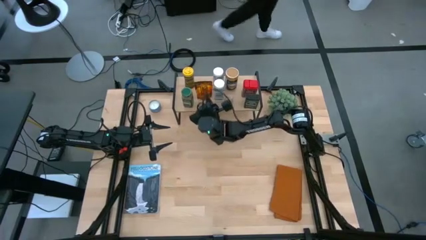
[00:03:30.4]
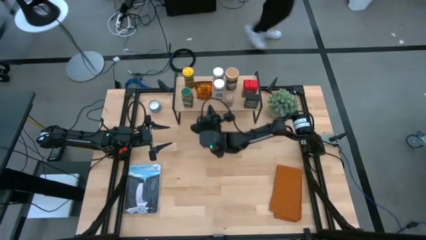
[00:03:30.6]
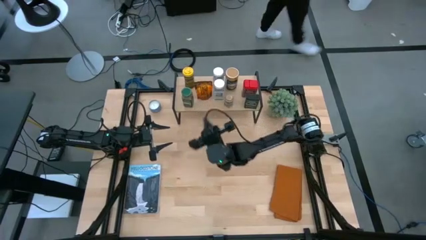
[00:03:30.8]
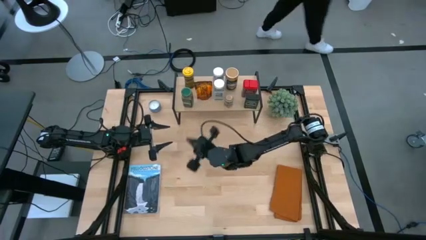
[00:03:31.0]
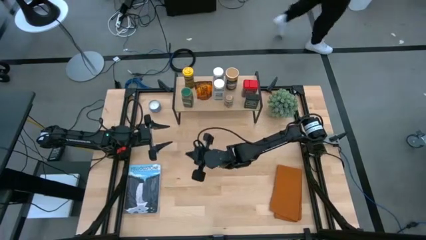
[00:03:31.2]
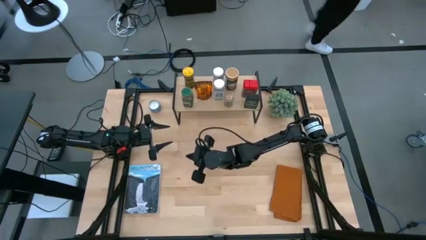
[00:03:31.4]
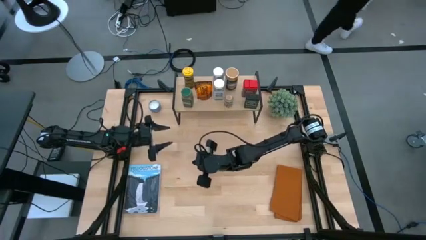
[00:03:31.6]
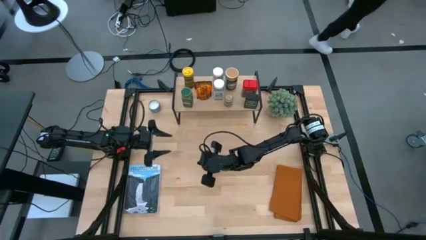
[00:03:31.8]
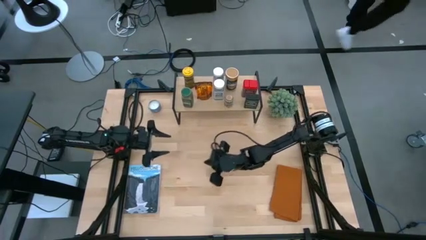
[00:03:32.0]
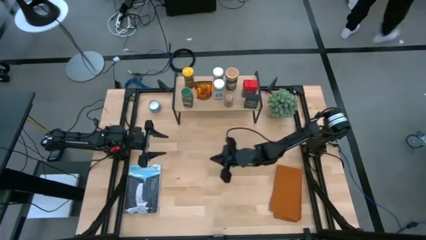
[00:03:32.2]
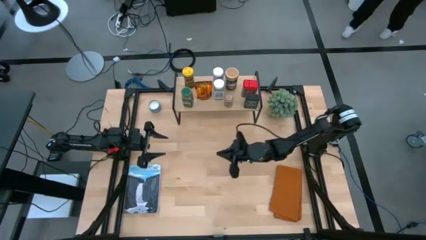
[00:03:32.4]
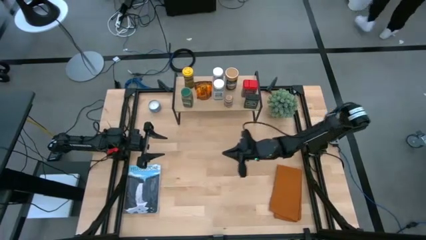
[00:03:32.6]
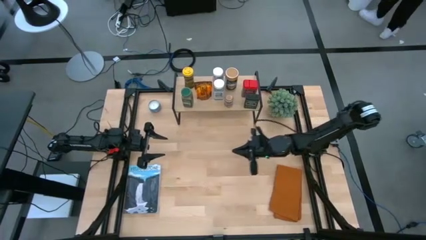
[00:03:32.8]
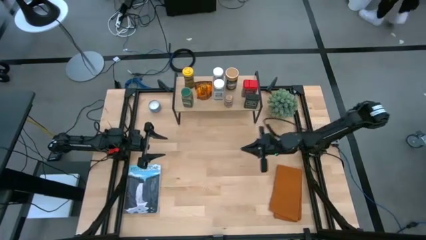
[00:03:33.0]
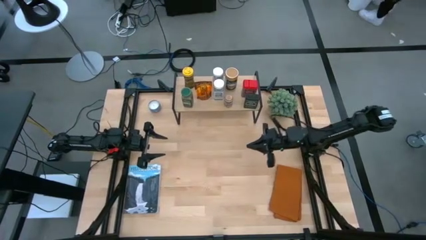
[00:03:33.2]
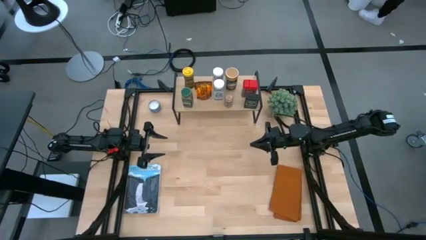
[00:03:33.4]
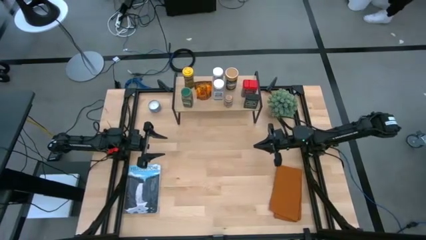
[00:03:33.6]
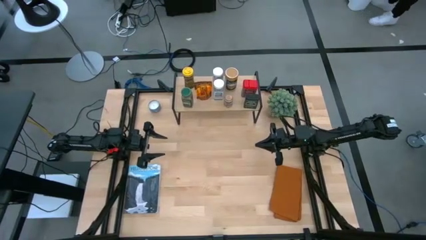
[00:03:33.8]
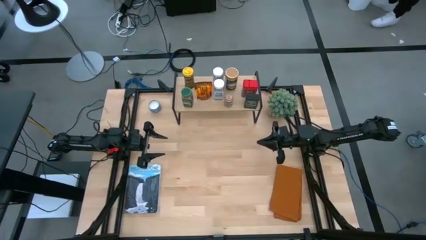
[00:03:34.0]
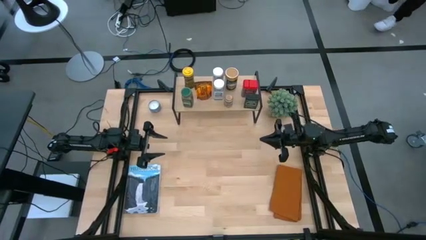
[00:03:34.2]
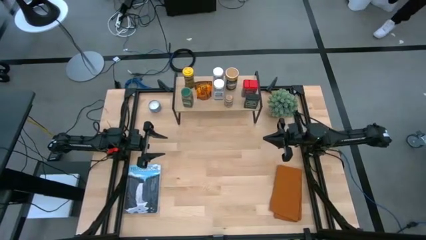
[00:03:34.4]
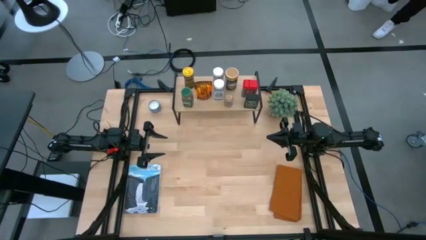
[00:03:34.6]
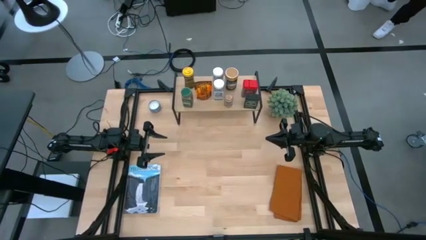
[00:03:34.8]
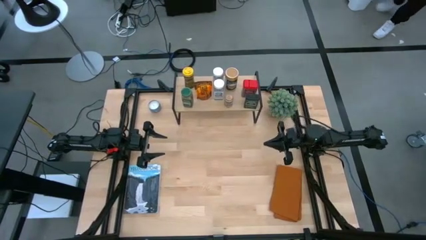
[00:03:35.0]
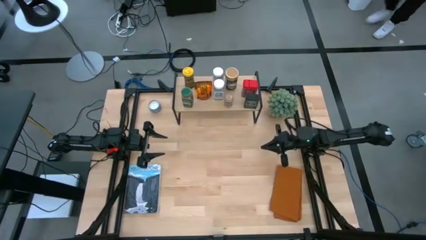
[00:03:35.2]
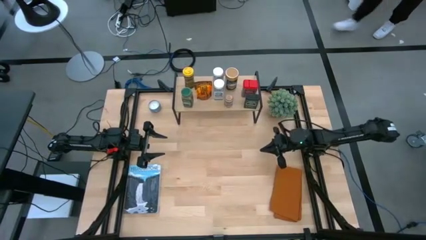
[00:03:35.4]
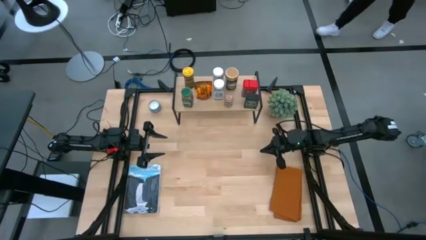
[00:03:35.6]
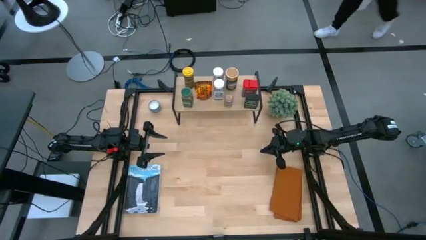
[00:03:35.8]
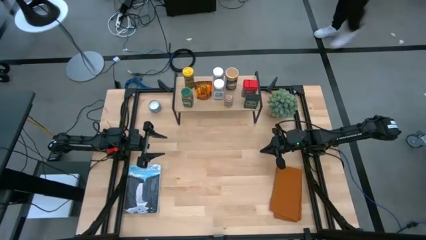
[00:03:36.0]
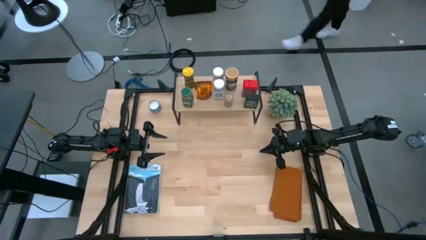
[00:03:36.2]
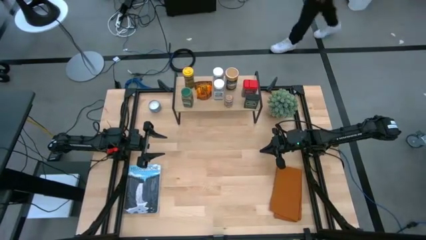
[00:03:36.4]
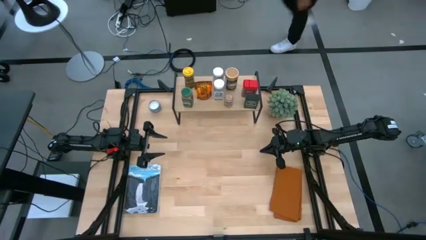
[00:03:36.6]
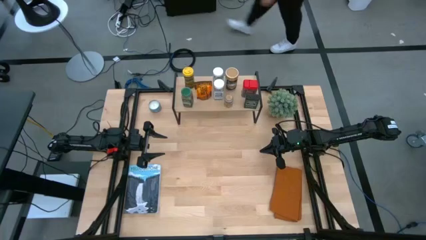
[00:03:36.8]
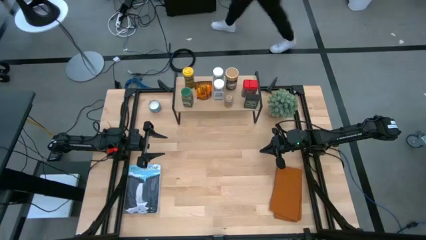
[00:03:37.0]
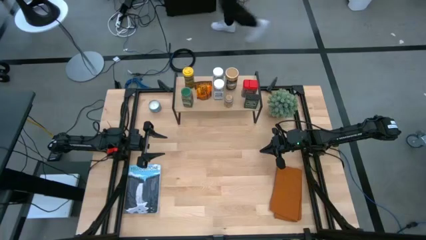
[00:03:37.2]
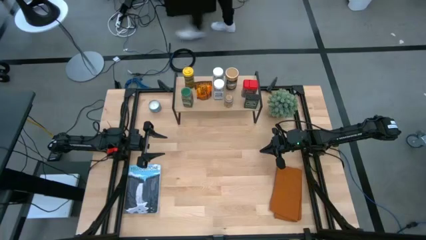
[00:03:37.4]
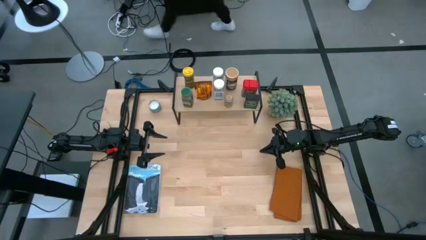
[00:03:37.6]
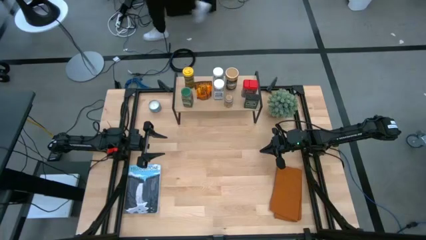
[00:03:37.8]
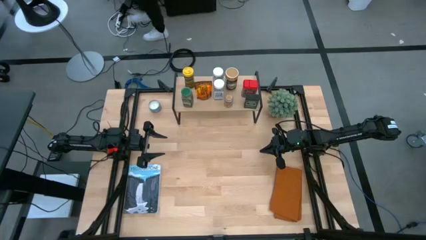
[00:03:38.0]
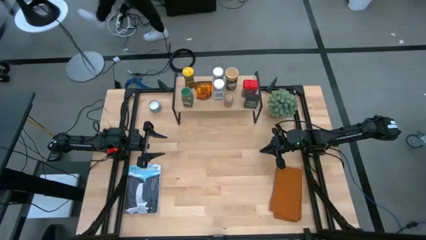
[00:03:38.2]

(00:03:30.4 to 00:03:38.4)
Task: Shelf spices
Return to Home Position

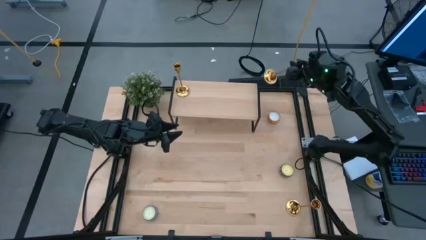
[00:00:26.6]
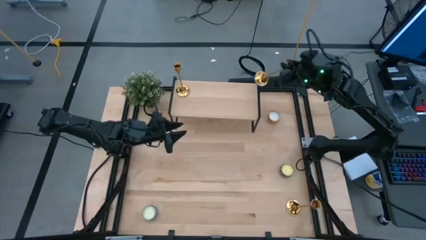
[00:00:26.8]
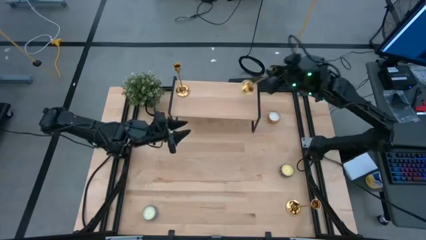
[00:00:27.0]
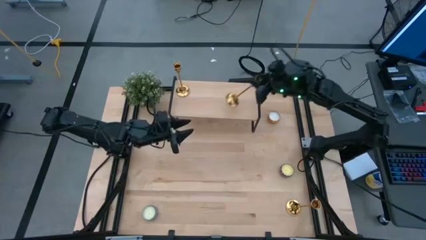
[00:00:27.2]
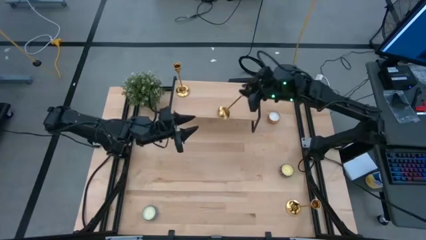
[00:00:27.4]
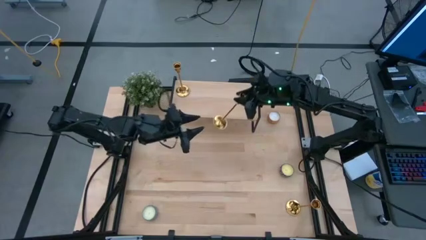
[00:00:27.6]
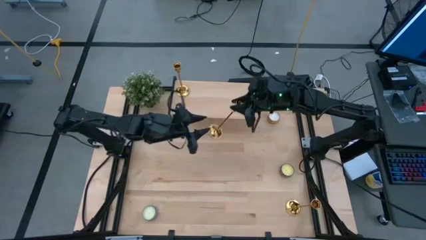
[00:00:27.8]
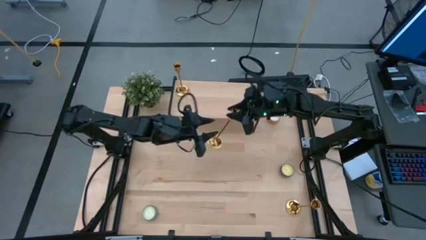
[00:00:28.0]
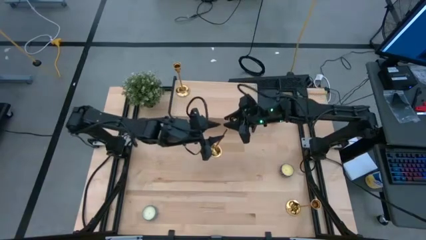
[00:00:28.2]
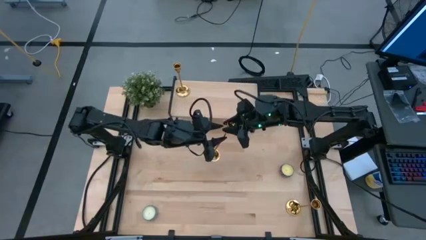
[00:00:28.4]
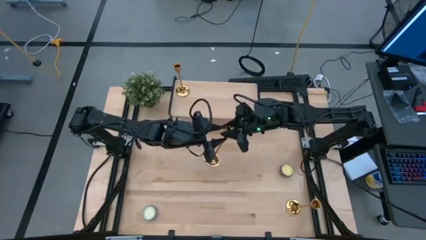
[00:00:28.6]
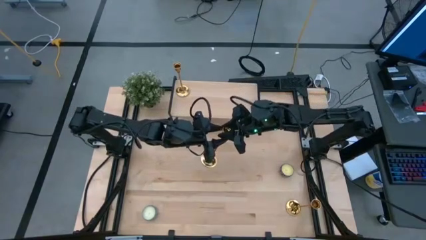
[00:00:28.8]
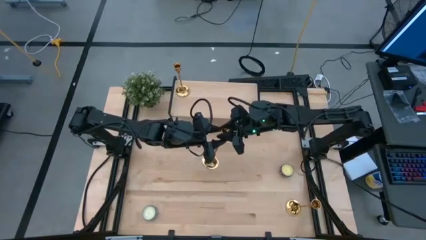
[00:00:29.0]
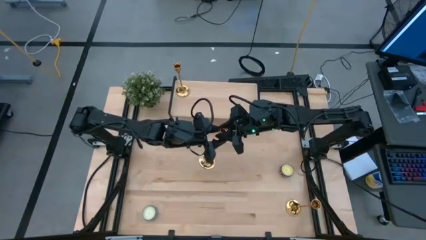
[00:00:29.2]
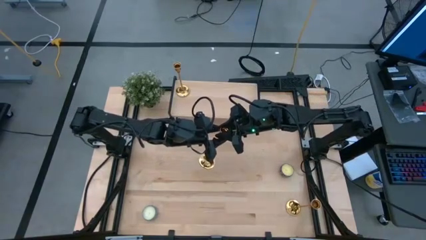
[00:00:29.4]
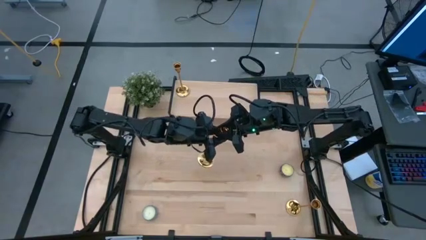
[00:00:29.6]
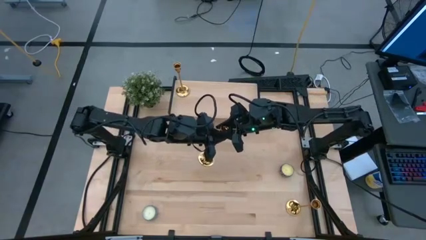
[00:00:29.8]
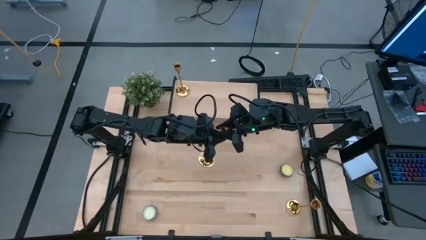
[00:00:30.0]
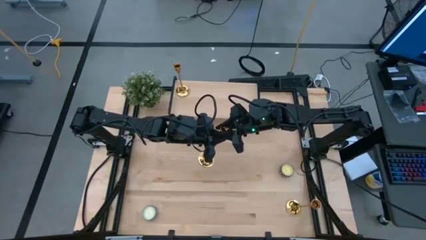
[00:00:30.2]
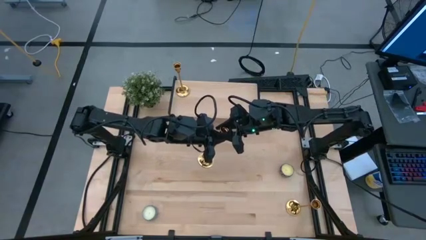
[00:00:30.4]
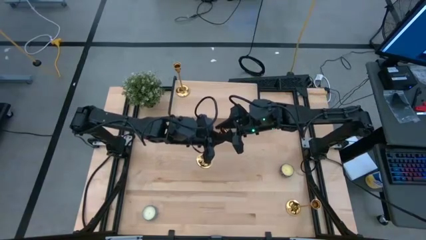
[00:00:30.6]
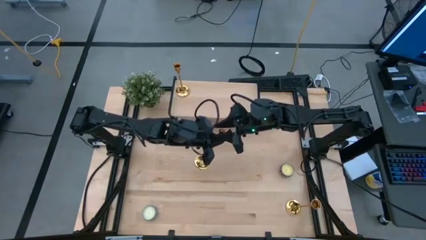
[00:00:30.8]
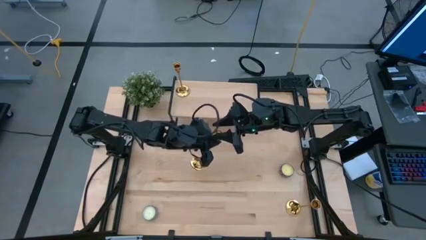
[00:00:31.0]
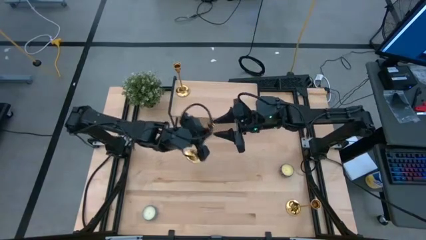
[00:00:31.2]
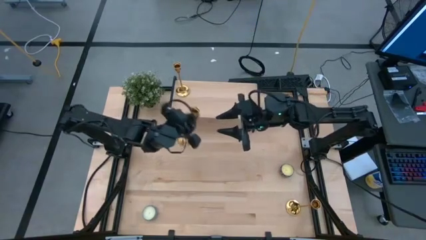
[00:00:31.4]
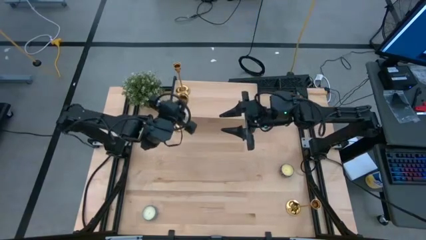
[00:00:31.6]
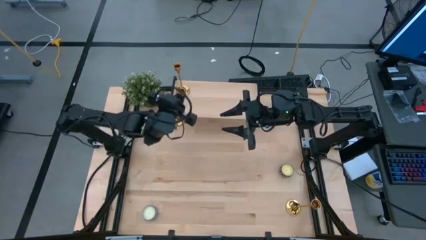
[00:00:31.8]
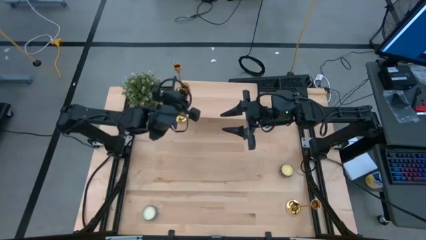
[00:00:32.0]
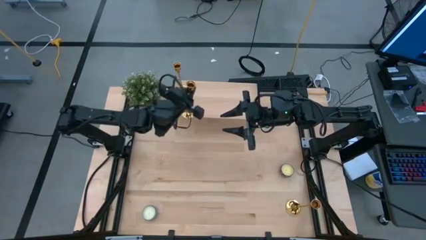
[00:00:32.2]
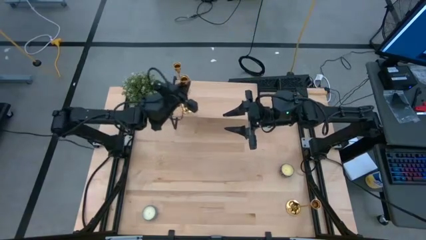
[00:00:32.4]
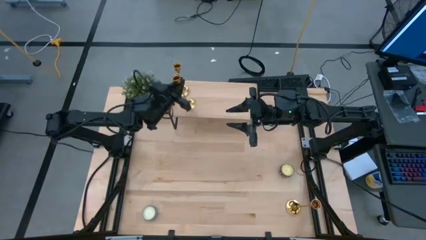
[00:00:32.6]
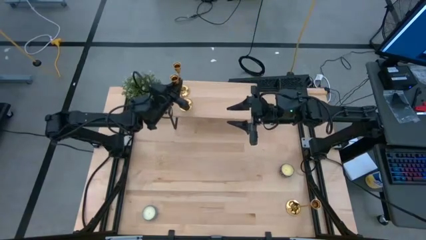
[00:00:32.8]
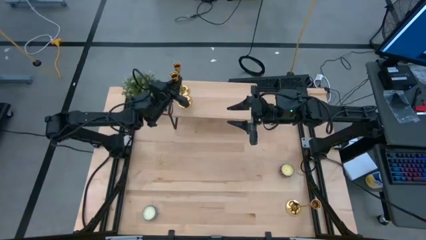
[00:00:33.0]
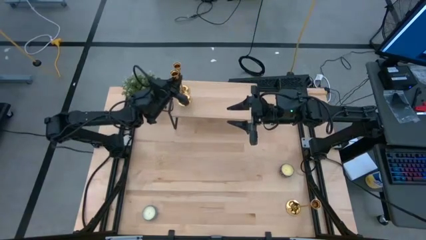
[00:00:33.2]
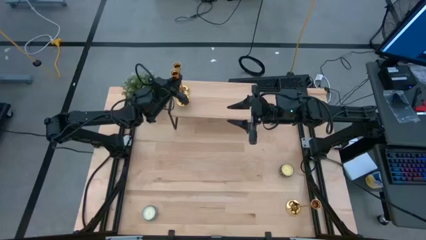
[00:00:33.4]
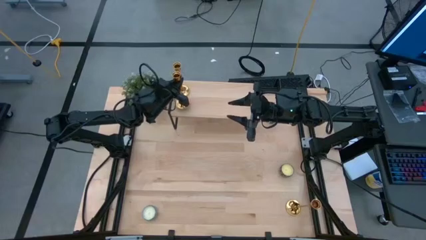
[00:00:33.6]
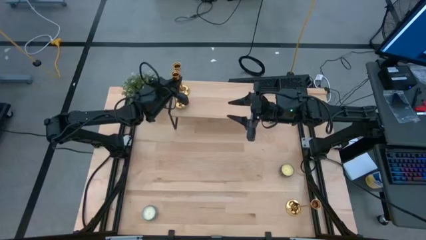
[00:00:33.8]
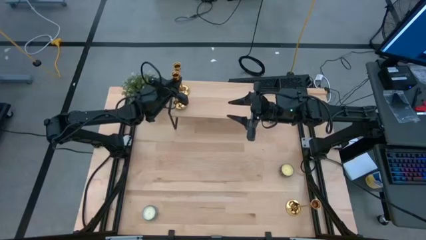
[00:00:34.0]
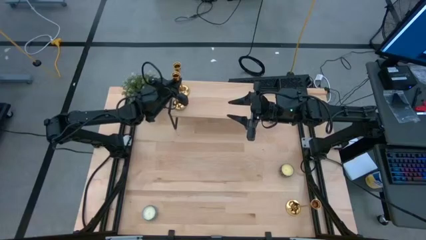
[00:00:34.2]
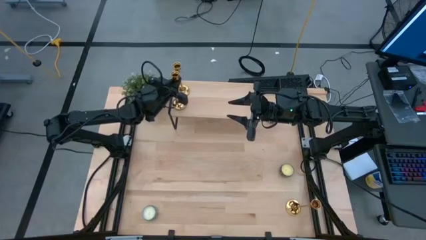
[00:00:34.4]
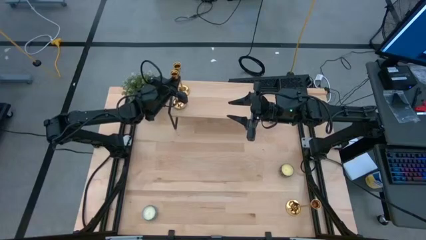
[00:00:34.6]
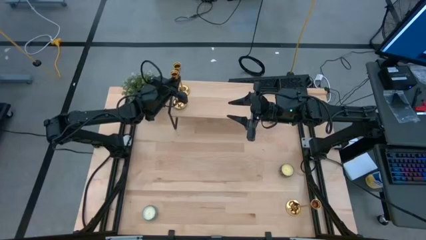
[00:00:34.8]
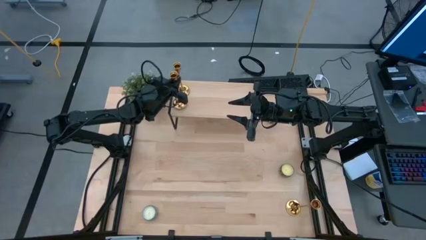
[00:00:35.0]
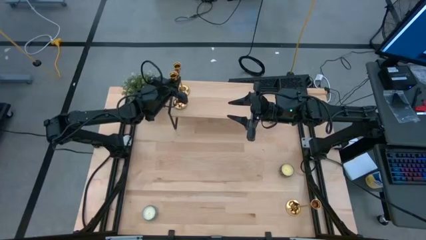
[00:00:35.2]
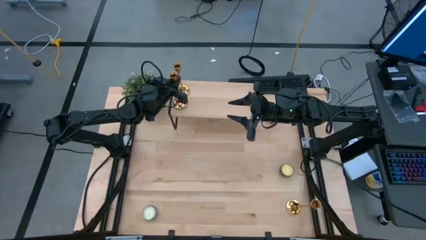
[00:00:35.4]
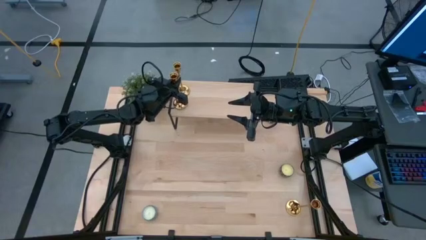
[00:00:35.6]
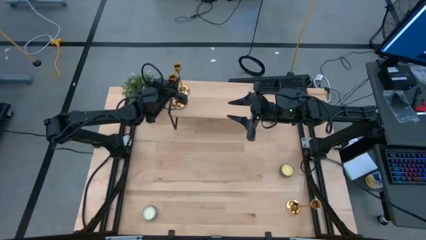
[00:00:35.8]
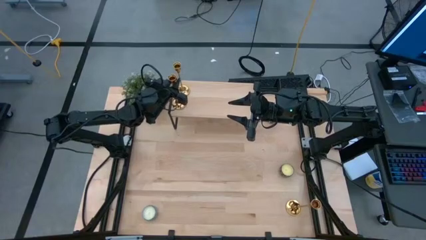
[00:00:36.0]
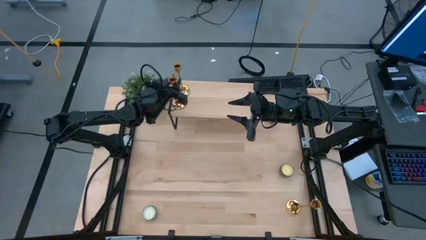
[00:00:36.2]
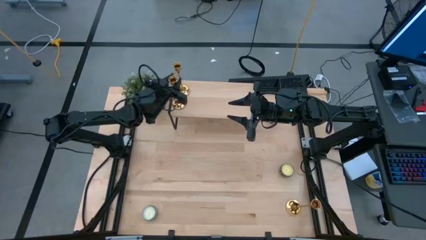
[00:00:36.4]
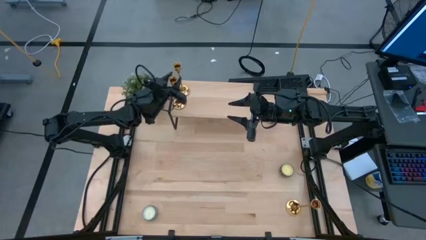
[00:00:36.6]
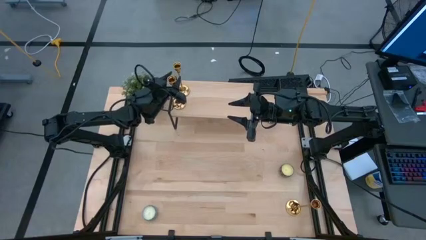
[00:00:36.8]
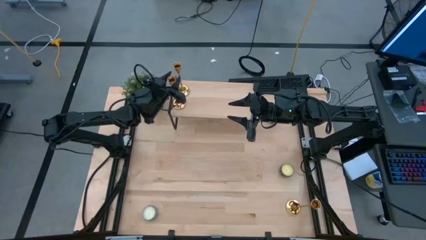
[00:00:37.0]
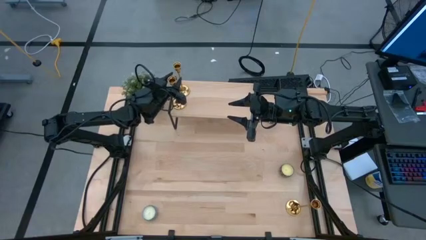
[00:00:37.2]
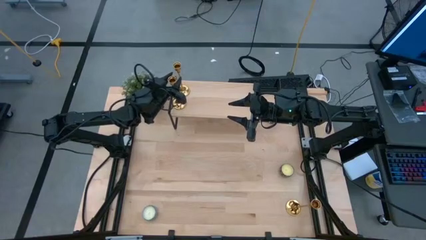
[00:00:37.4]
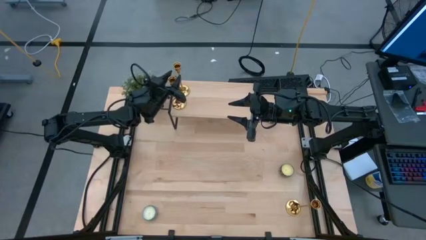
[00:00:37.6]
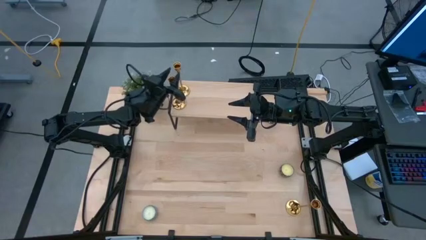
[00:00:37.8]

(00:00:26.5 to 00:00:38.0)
Task: Pick & Place candle stick holders
Put the top gold candle holder on the shelf
